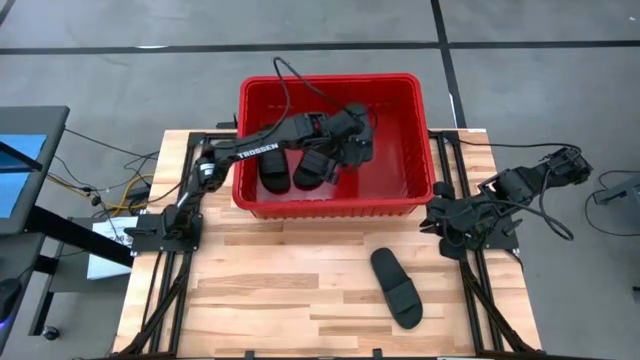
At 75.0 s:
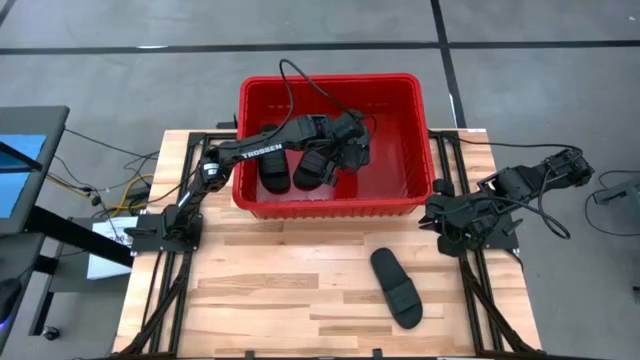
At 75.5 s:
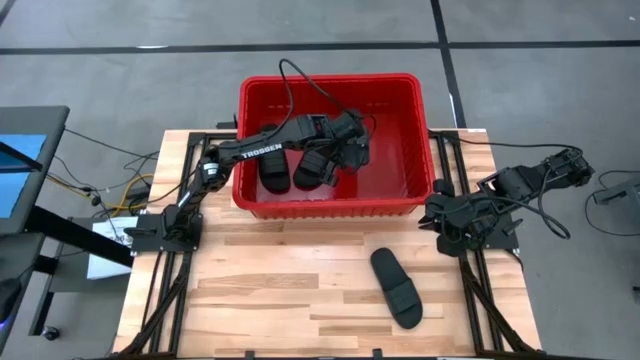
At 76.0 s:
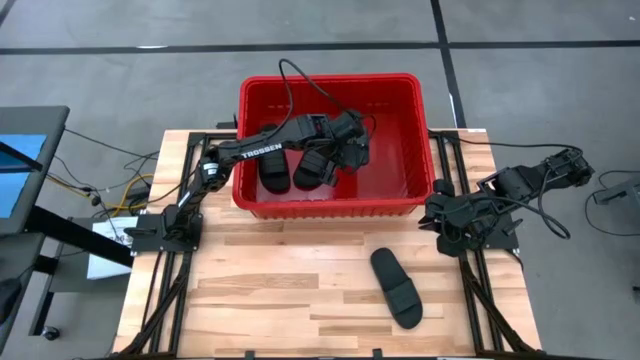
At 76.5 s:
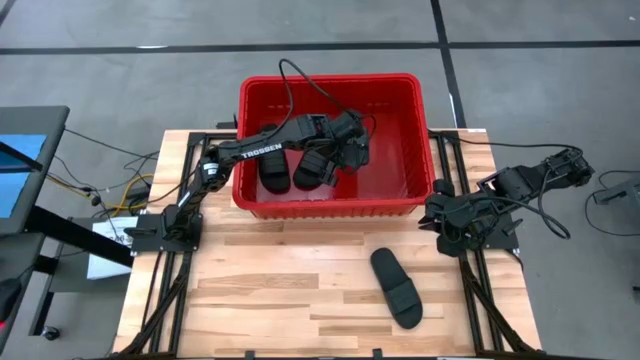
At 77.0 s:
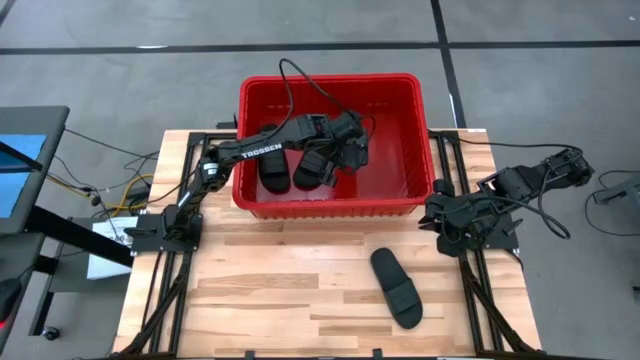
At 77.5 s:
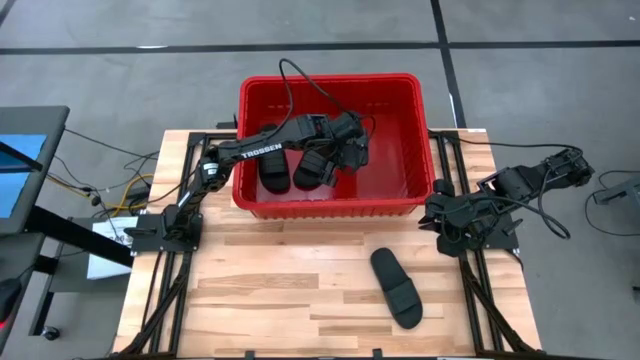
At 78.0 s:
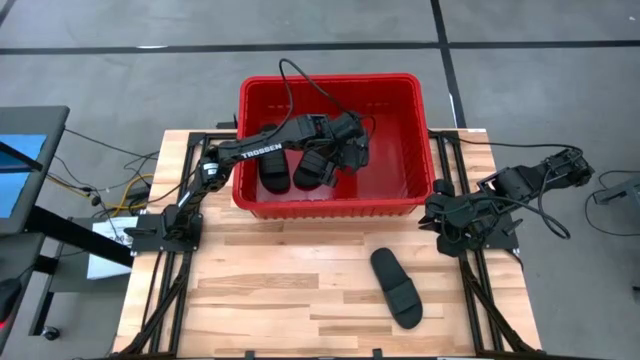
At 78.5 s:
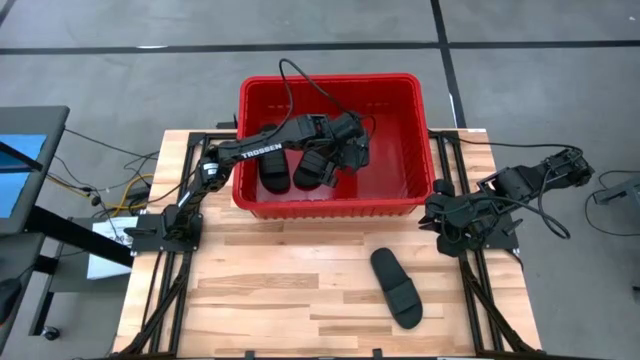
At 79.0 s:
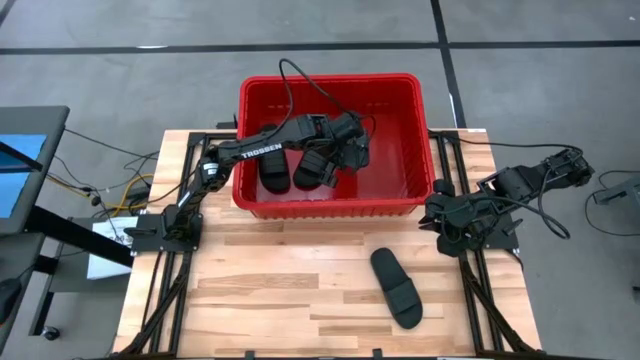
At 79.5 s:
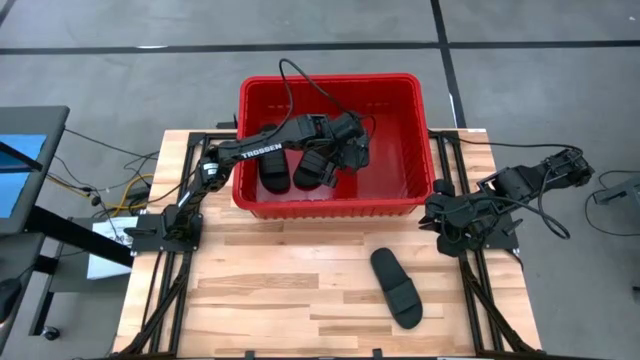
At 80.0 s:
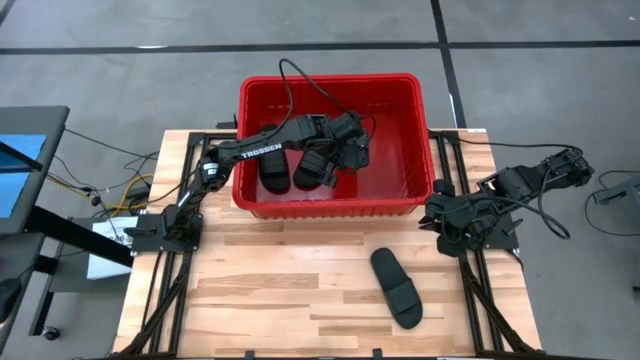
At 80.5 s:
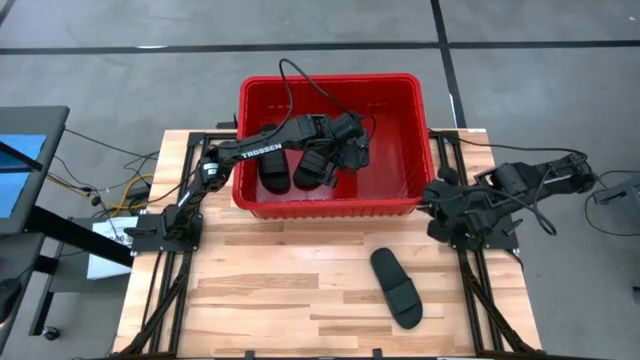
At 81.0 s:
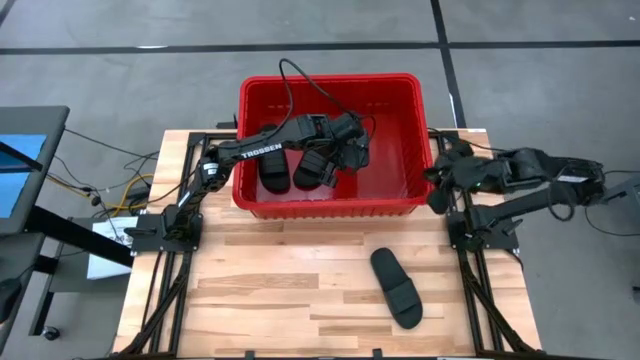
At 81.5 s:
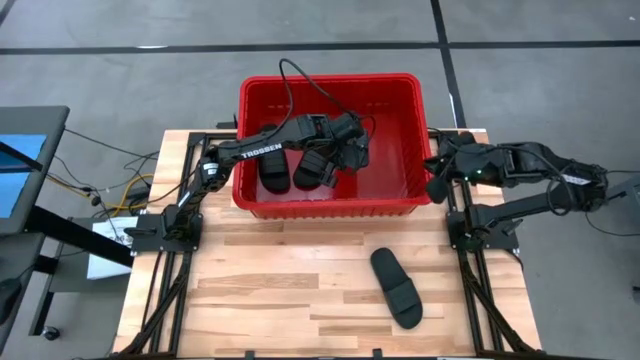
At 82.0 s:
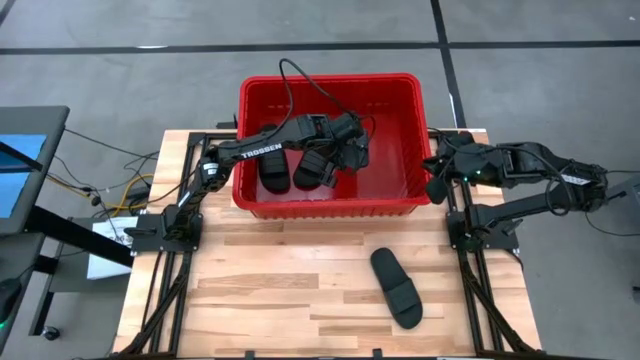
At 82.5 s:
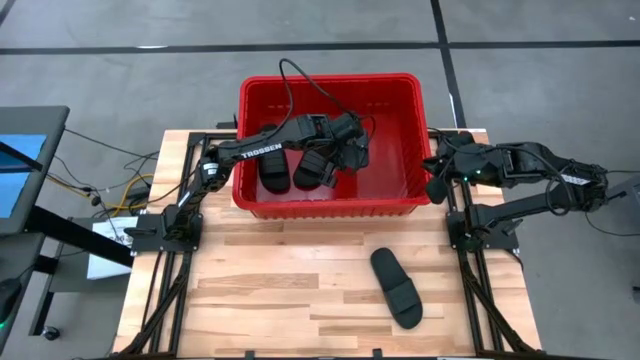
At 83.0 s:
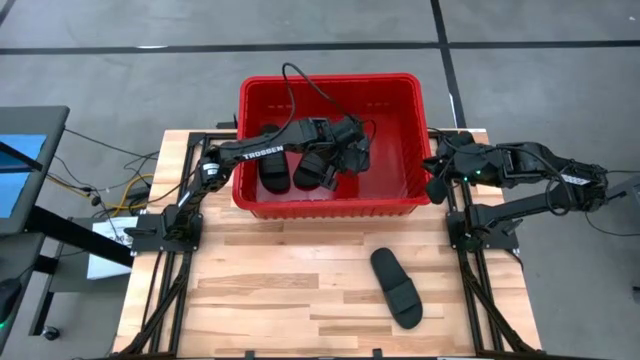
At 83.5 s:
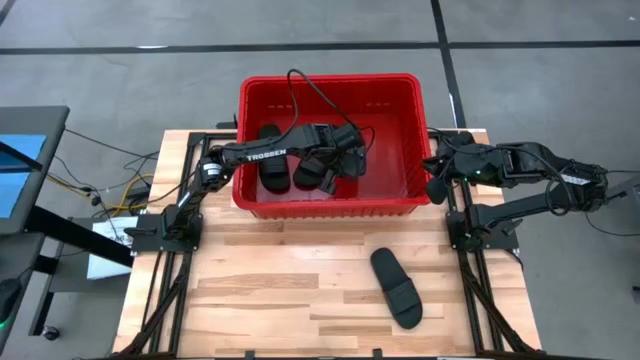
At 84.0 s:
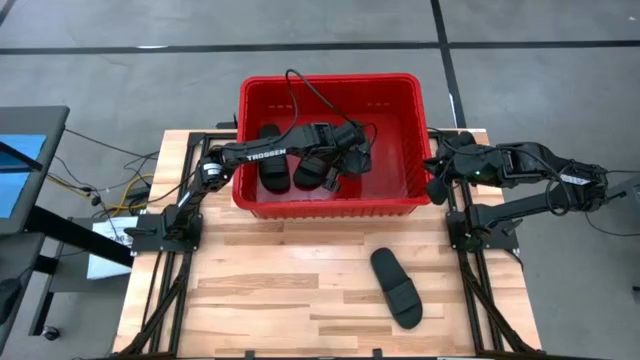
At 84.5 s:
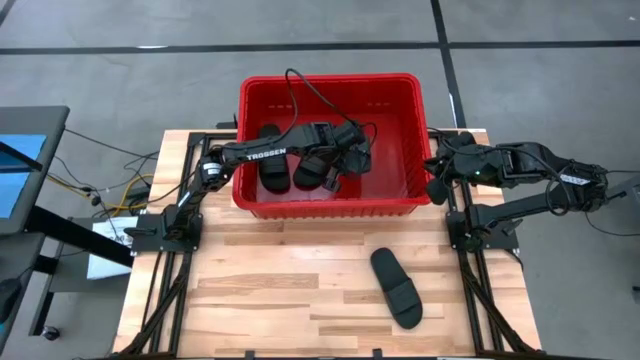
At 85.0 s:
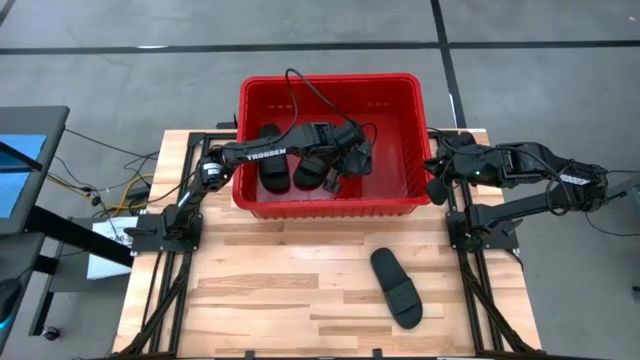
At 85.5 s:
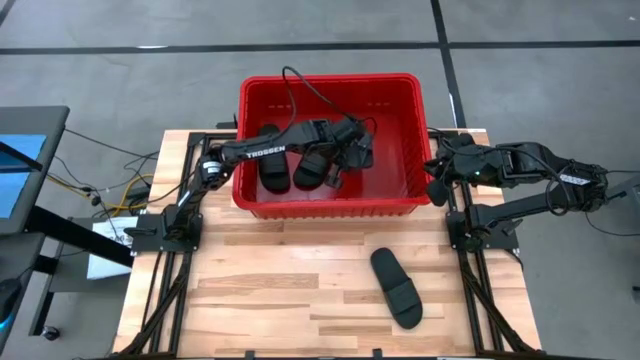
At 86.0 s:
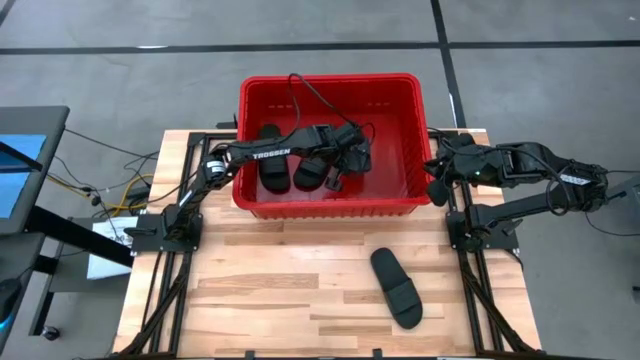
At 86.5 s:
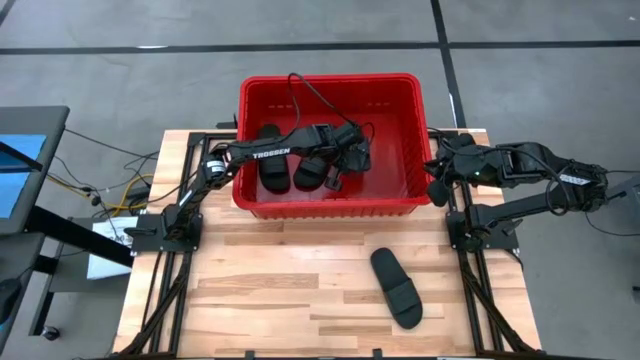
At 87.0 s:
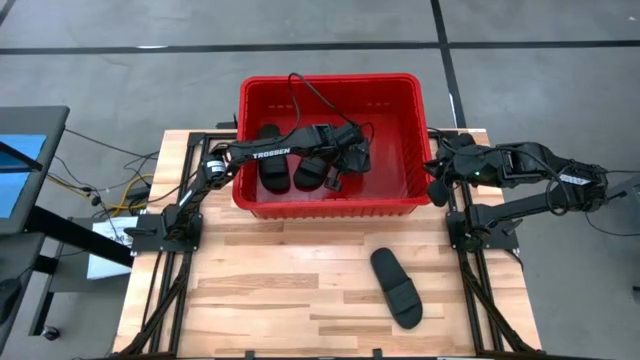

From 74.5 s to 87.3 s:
Task: Pick and place slides into bin
Put the black slipper into the red bin

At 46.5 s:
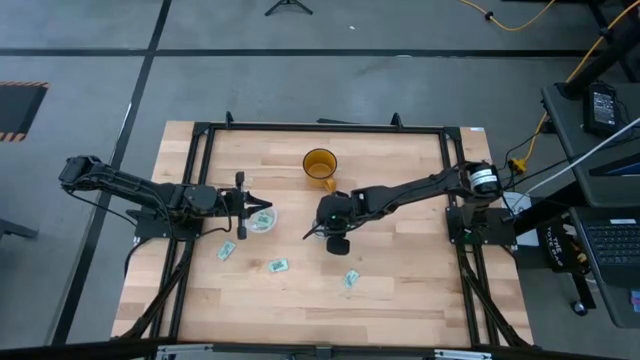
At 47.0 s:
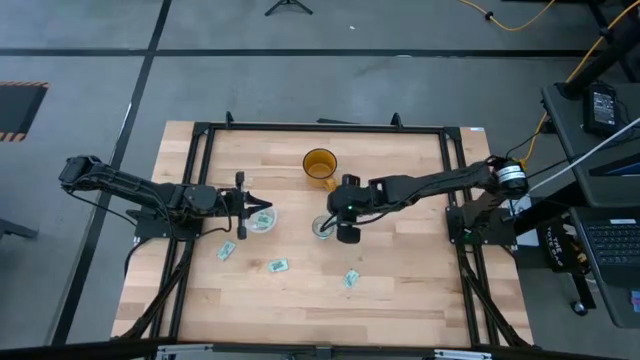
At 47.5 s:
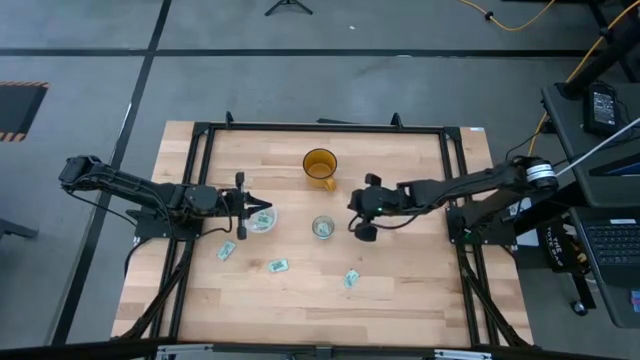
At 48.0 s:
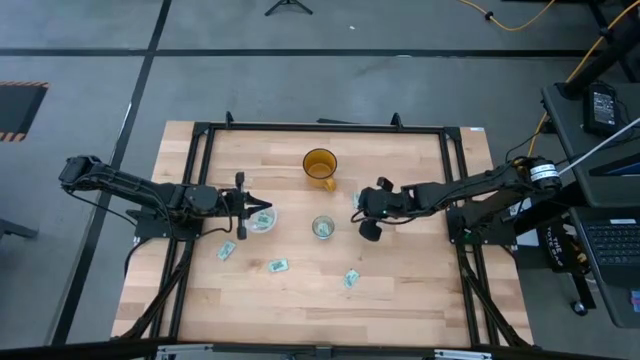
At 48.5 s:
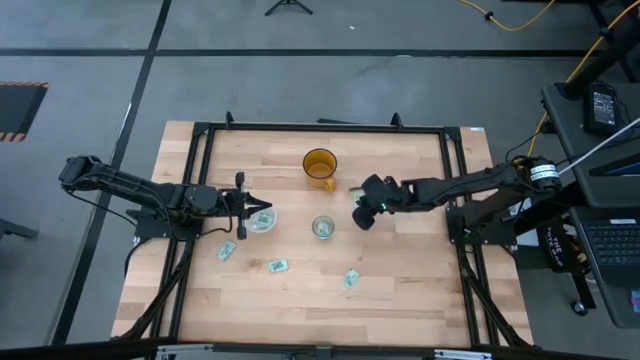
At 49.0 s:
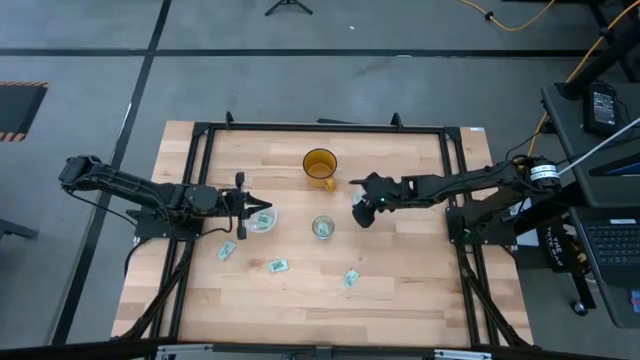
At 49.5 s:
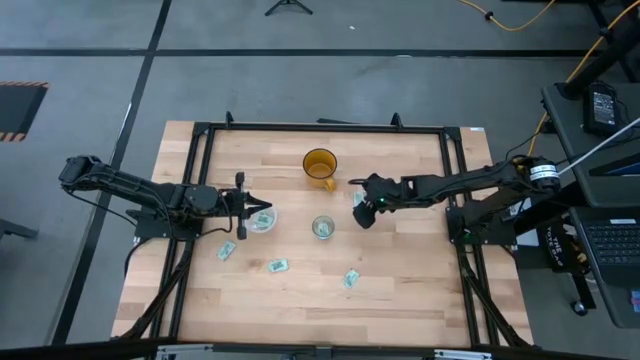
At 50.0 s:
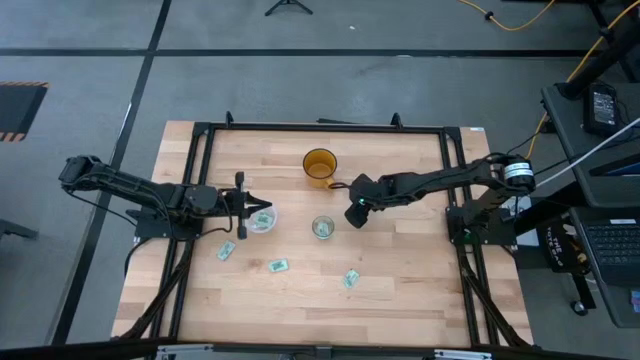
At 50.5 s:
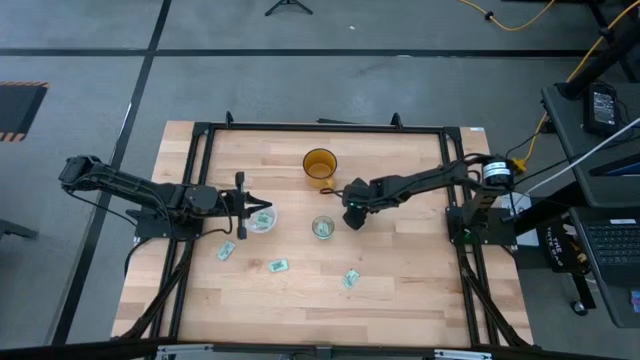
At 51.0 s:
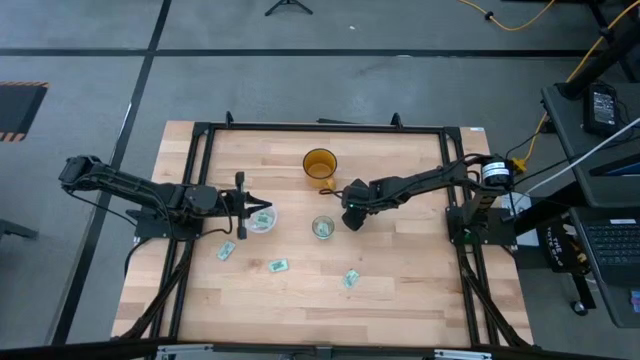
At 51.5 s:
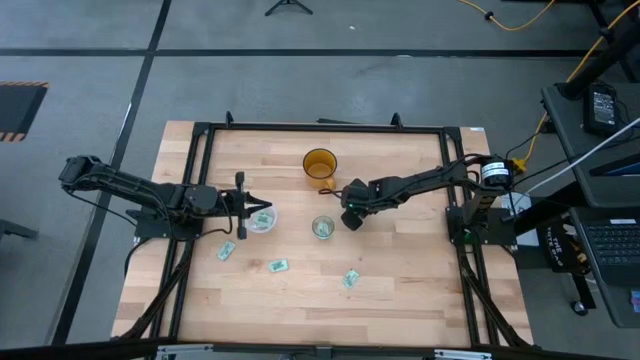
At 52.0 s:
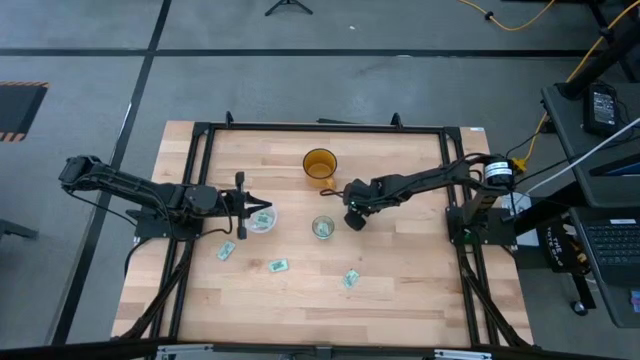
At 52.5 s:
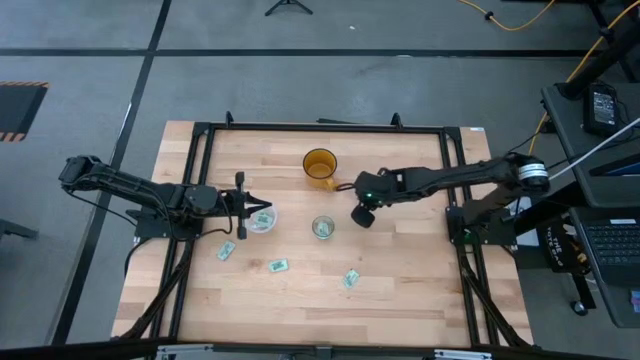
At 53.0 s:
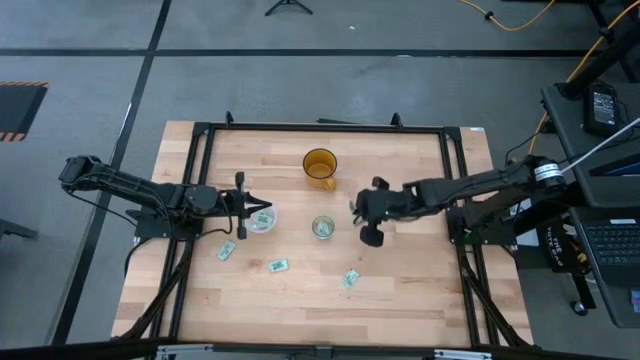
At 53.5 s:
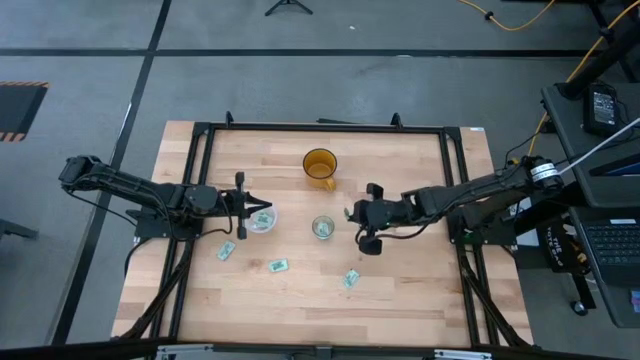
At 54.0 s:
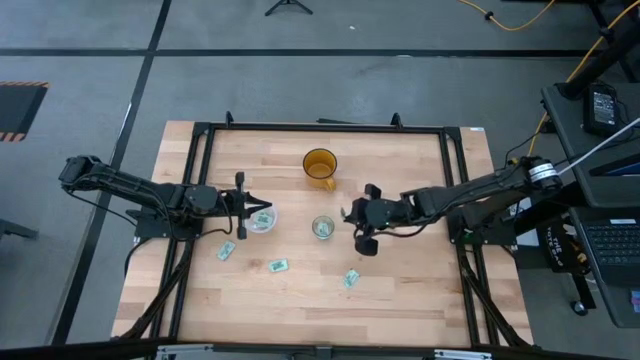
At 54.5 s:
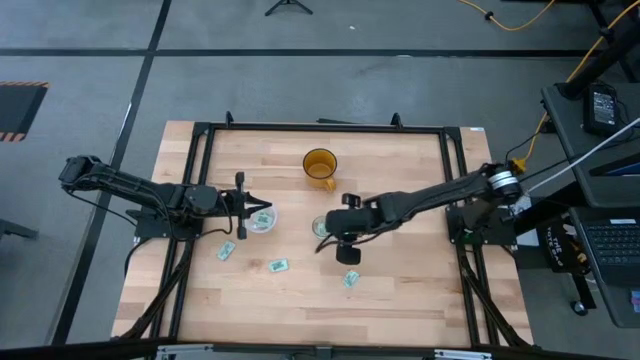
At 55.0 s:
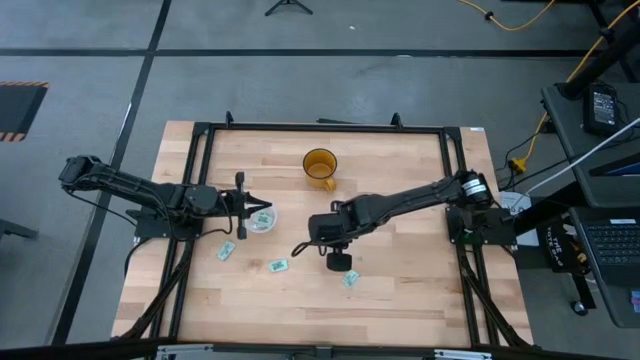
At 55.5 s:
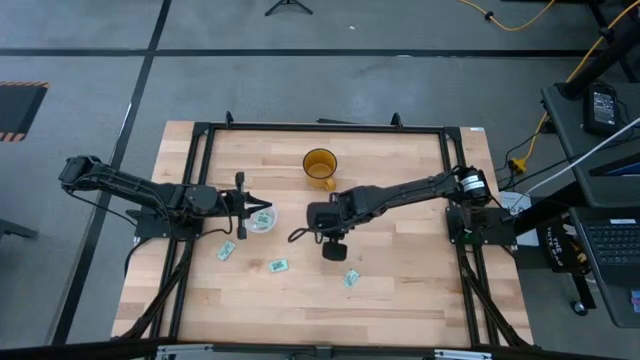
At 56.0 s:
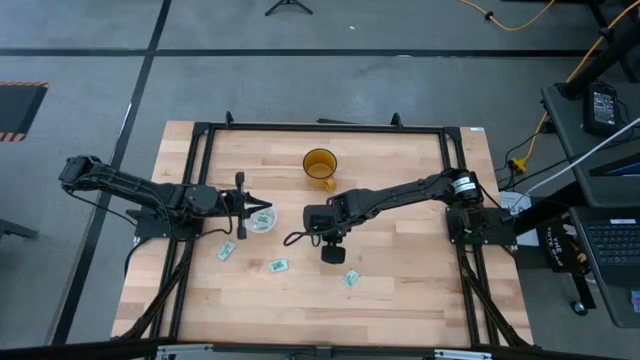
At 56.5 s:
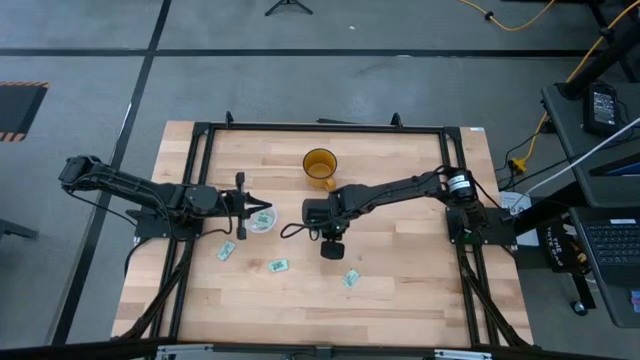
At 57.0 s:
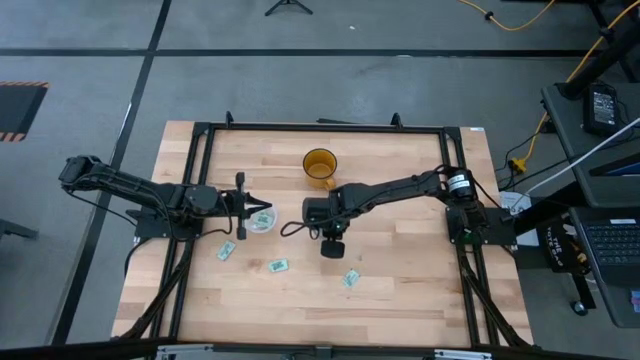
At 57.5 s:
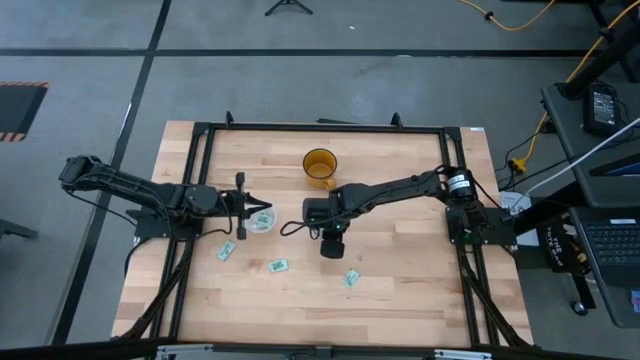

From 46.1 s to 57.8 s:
Task: Pick and place Stevia / Truvia into bins
Put the stevia packet into the glass tupperware
